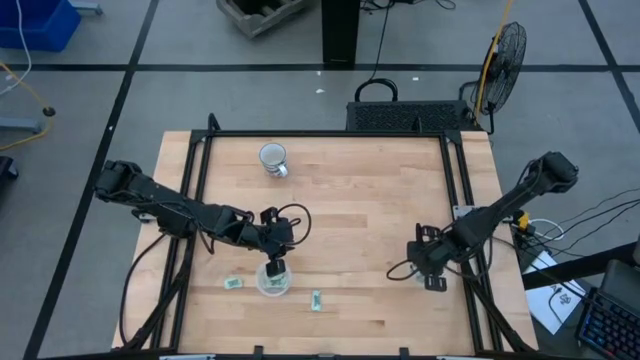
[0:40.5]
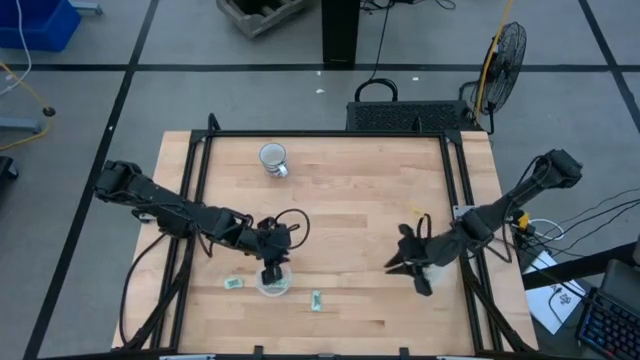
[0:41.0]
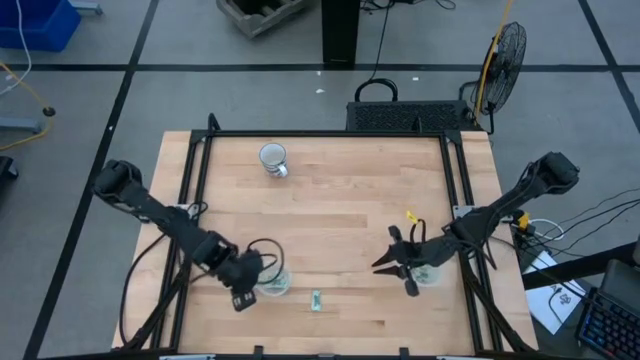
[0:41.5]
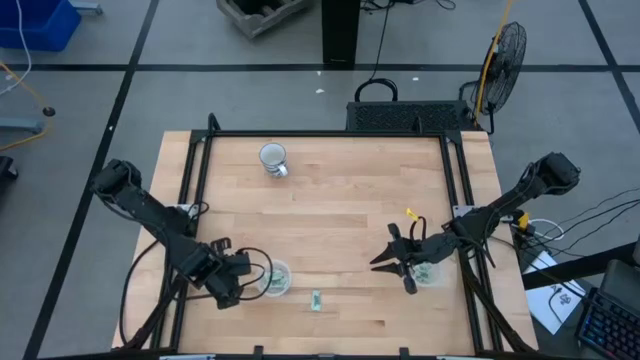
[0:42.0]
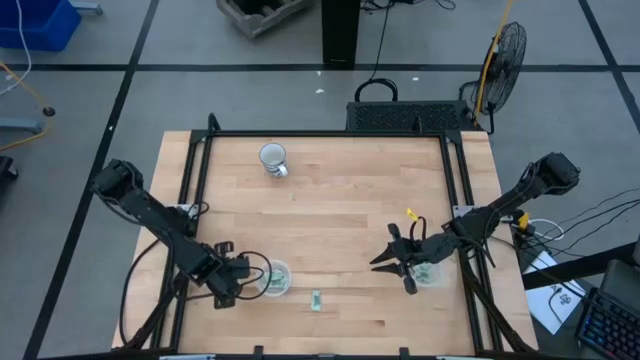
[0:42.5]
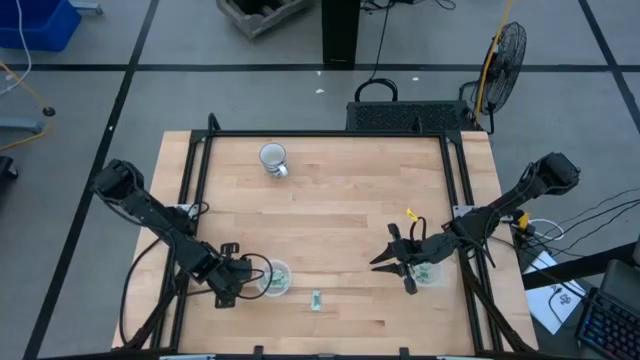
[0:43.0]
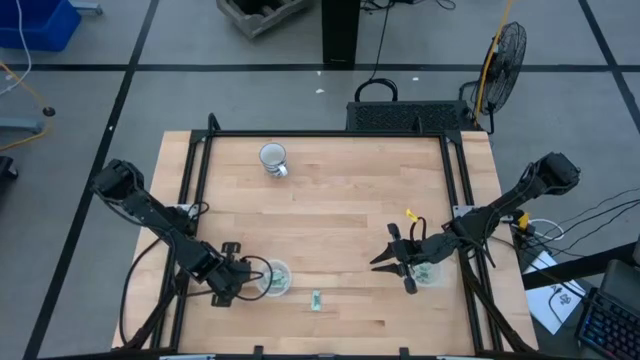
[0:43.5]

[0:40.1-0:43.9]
Task: Pick and place items into bin
Put the stevia packet into the left transparent bin

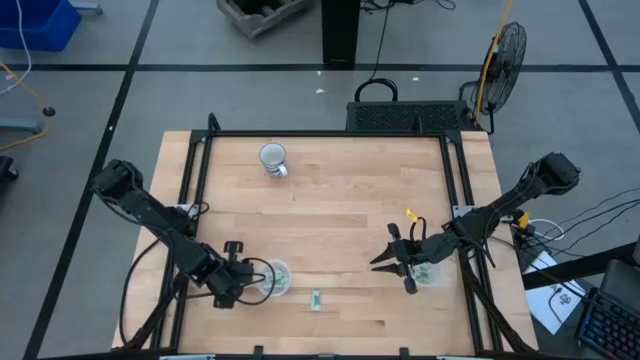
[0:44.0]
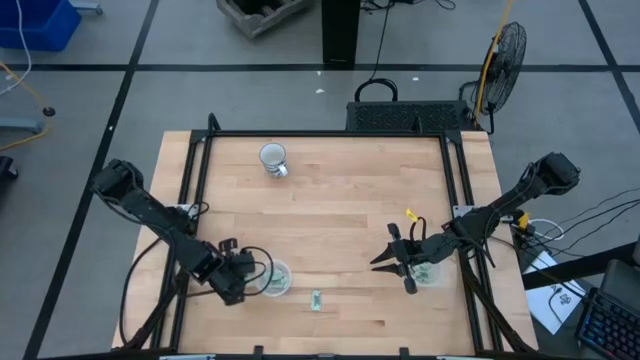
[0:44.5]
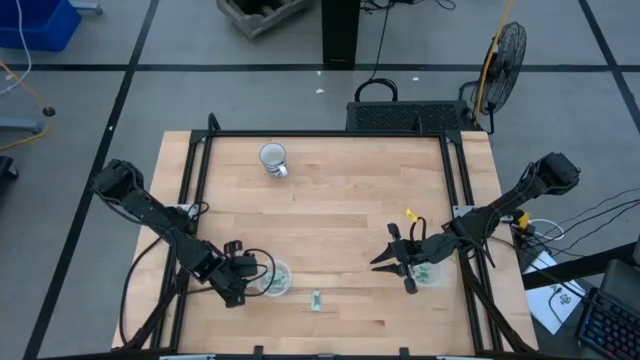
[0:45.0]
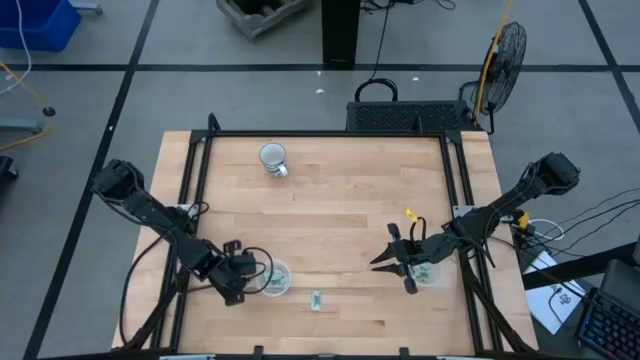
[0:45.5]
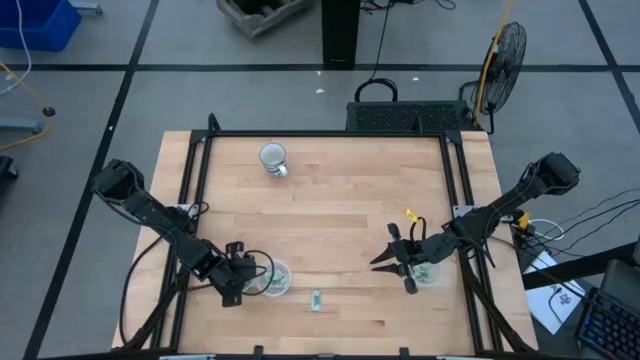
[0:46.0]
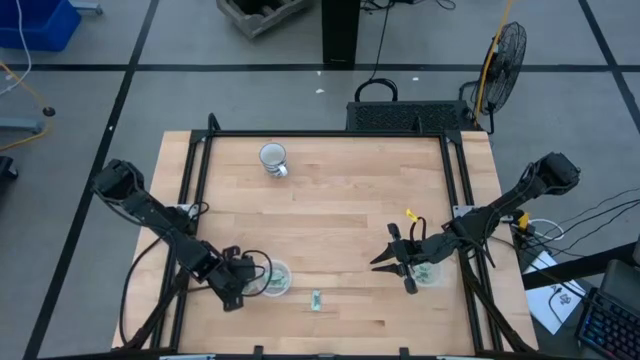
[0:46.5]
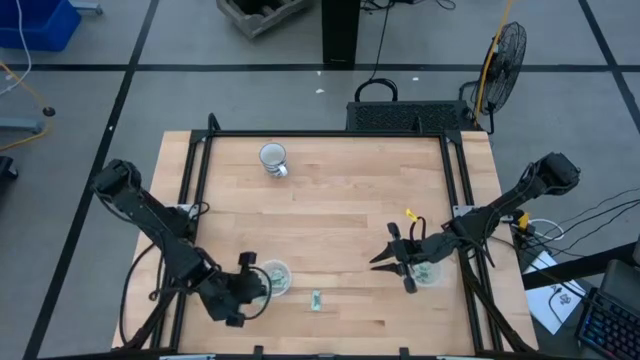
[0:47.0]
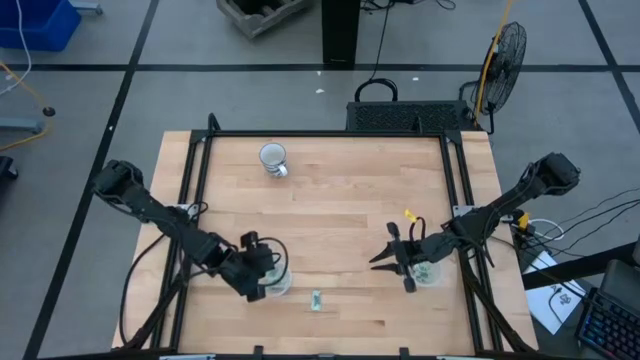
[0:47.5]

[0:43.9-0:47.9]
Put the stevia packet into the left transparent bin

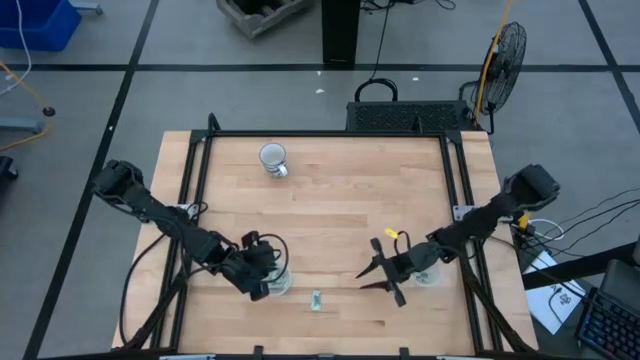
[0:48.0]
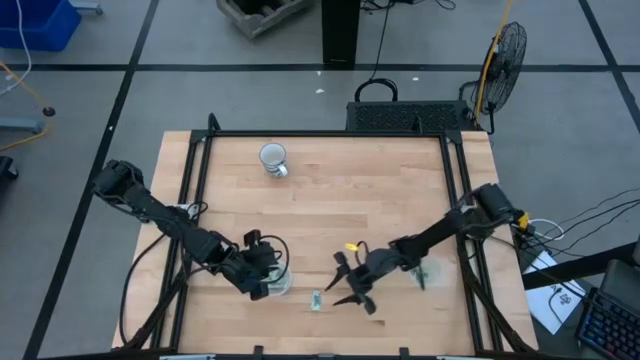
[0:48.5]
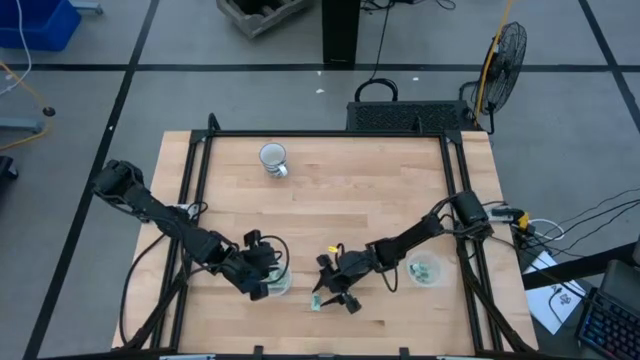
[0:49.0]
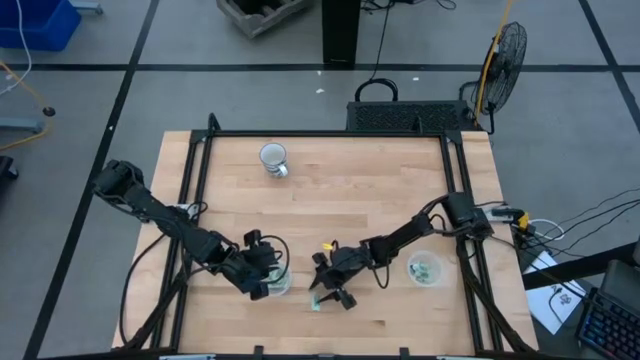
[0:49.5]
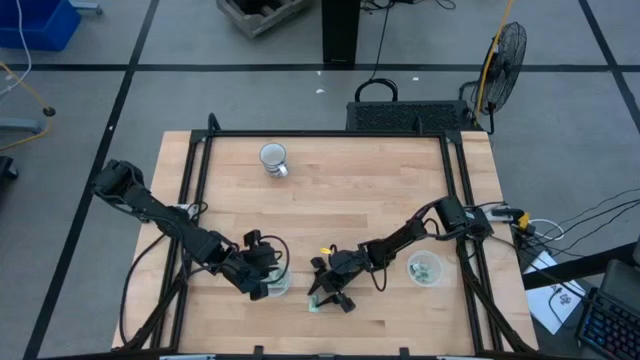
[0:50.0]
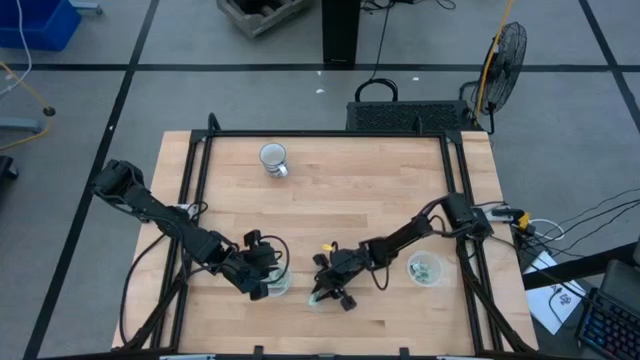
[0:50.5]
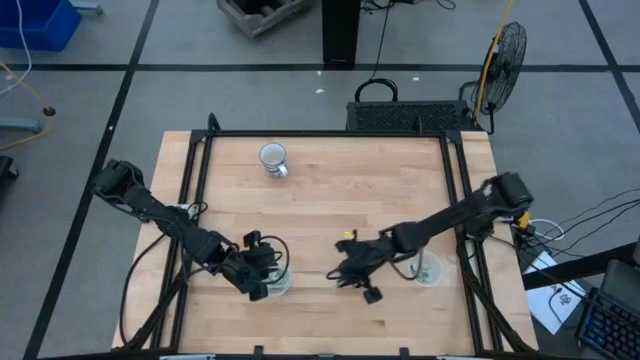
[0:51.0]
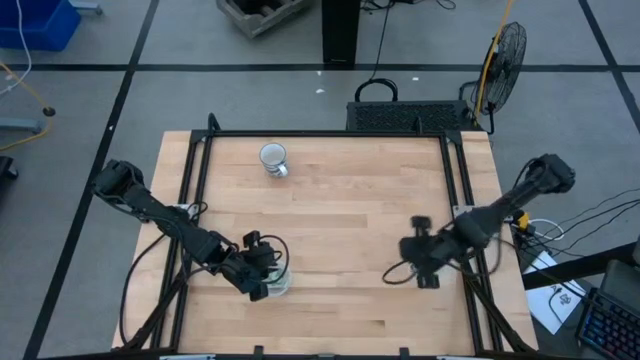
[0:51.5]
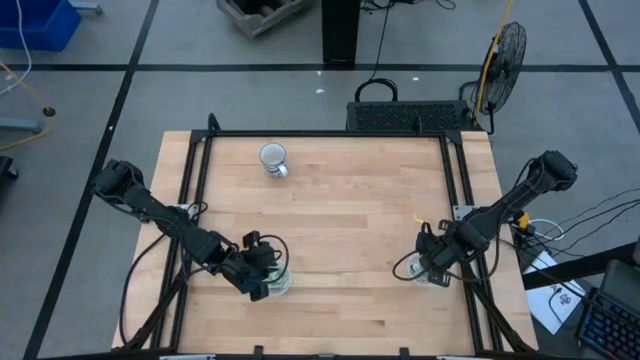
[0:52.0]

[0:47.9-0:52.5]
Put the stevia packet into the right transparent bin

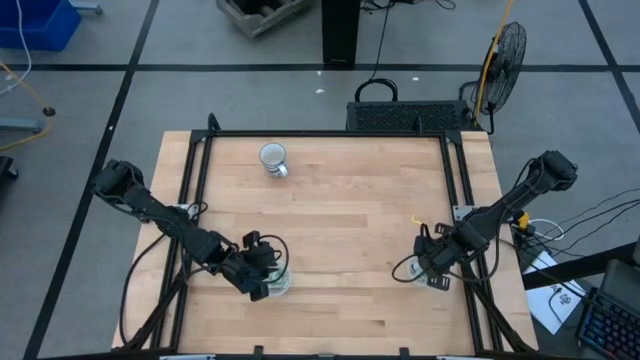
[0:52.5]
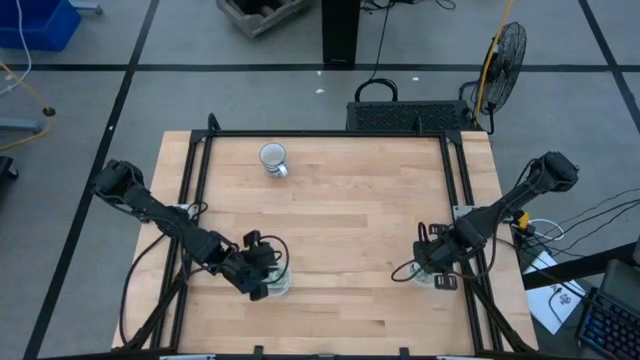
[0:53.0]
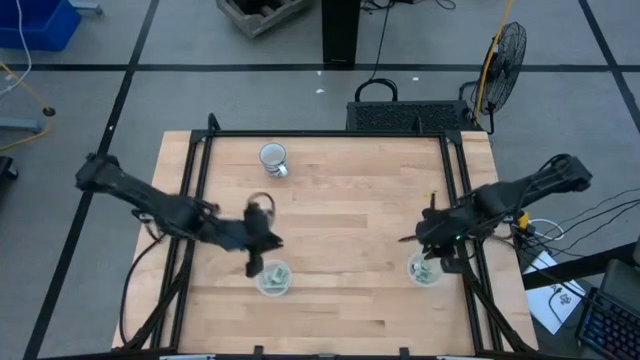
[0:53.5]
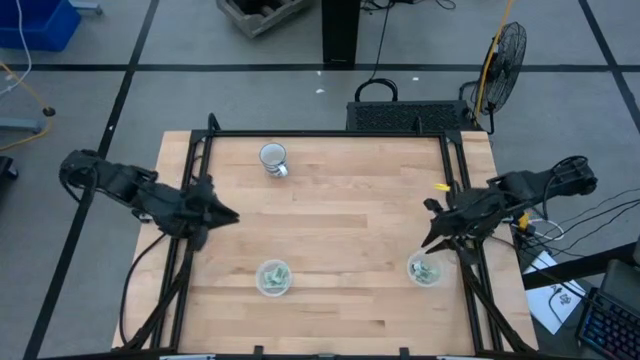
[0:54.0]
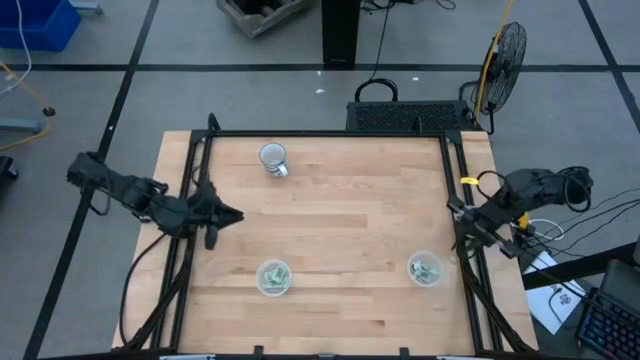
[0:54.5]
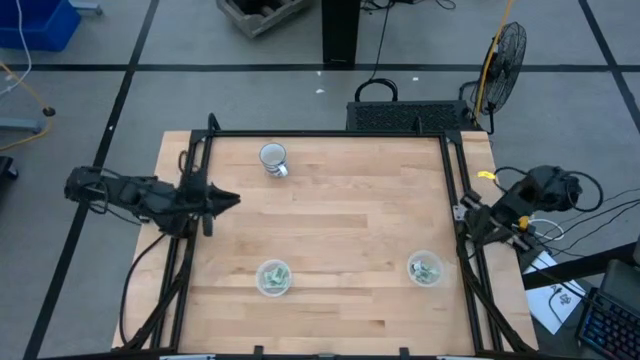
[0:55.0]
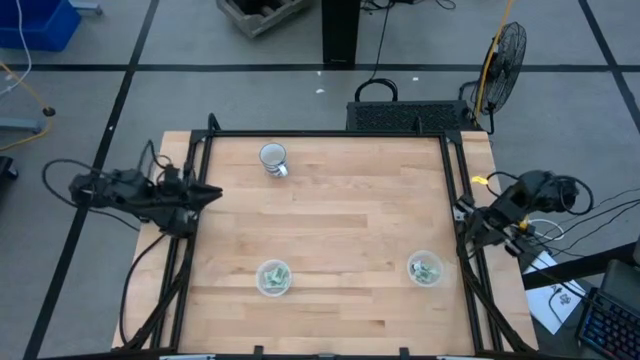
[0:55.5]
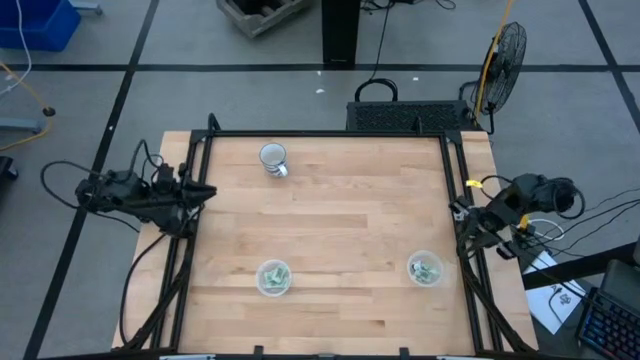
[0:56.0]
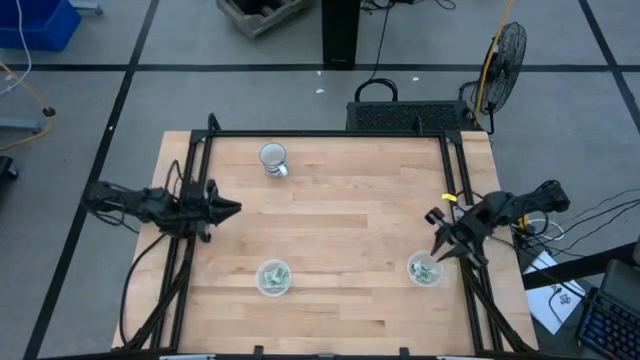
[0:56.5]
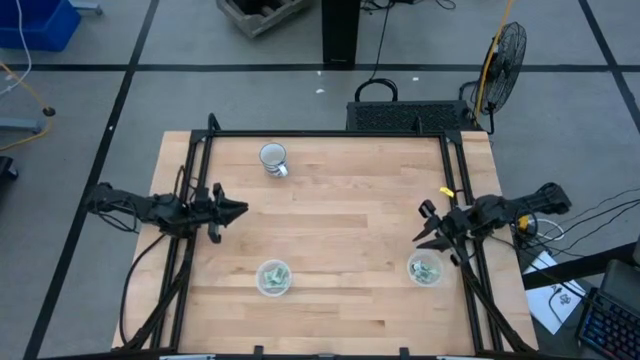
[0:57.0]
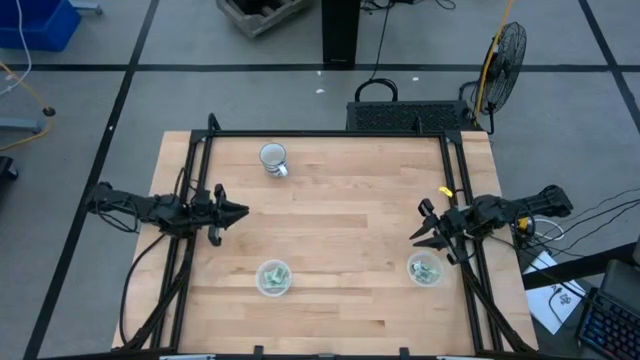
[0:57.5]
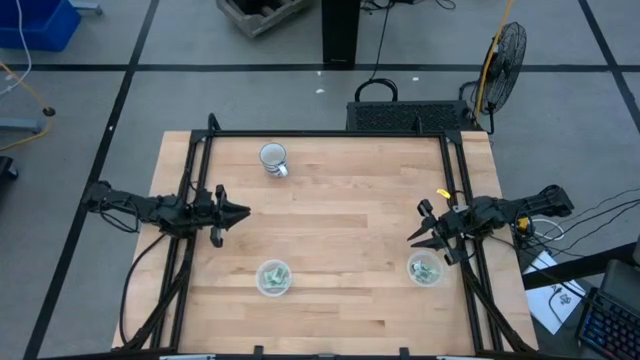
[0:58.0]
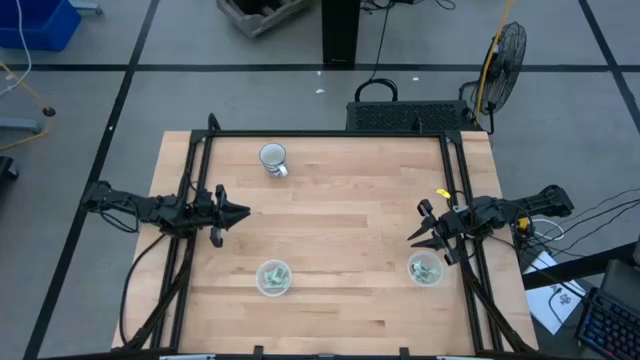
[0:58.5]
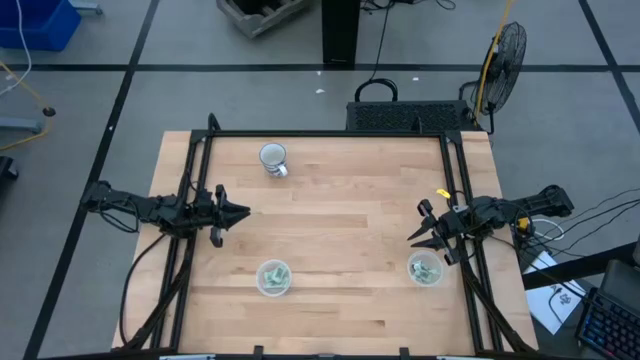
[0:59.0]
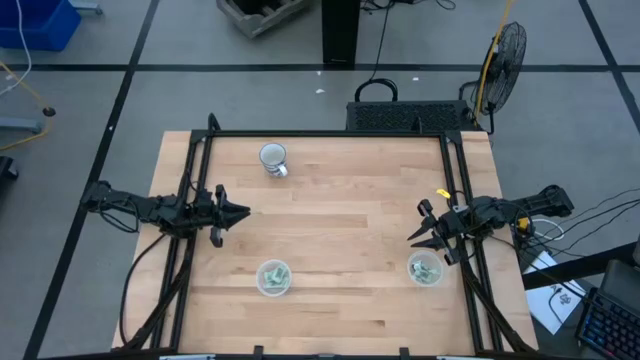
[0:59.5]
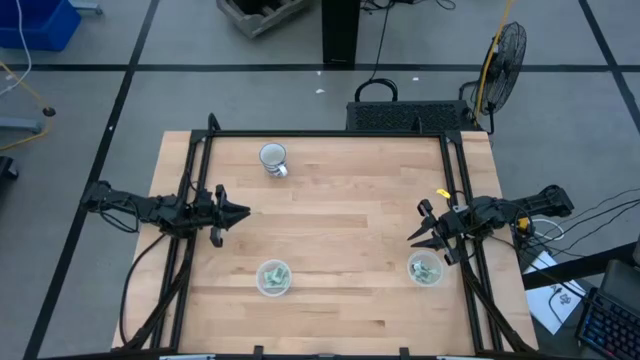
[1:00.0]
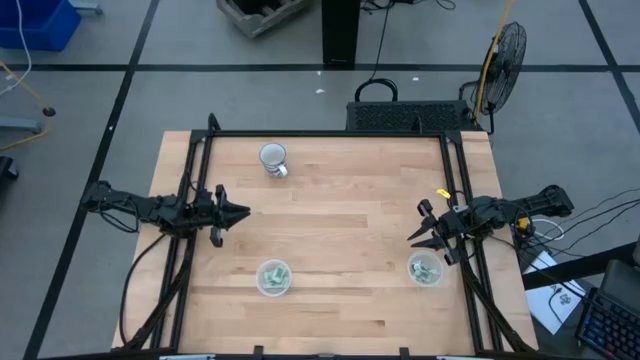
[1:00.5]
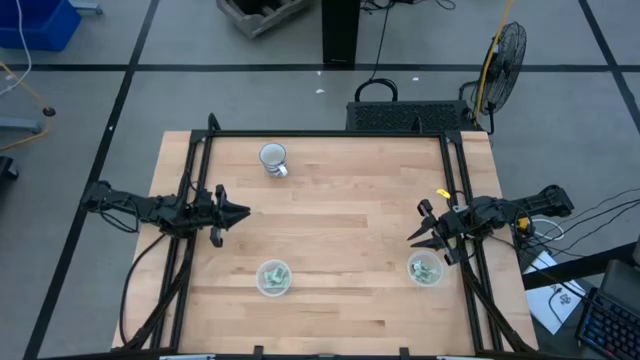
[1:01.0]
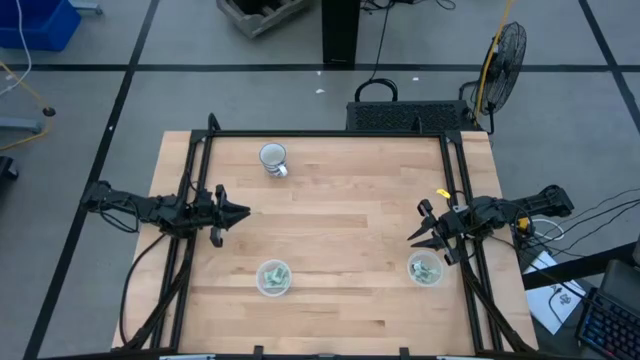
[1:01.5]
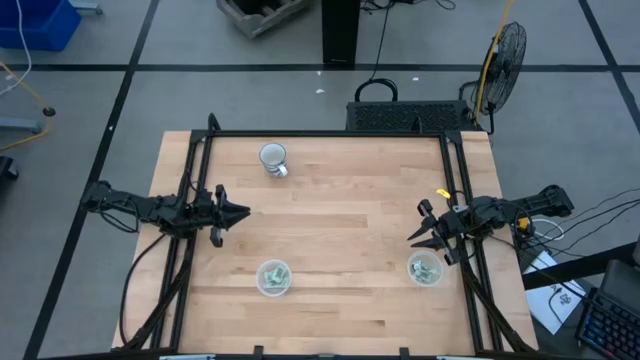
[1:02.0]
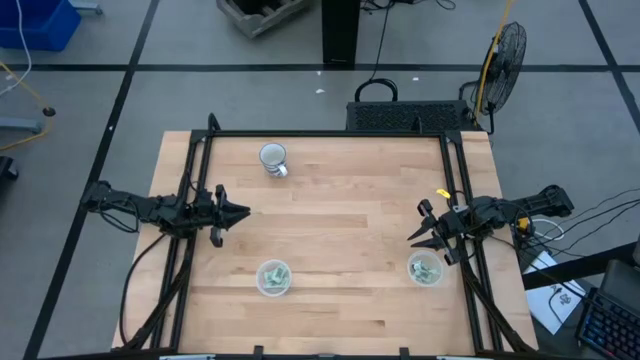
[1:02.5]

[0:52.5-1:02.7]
Return to Home Position
